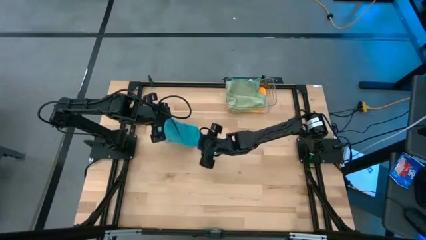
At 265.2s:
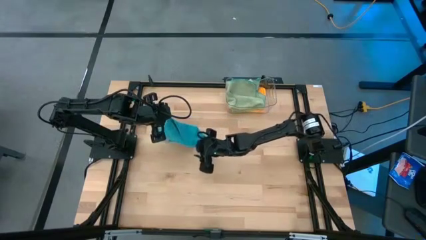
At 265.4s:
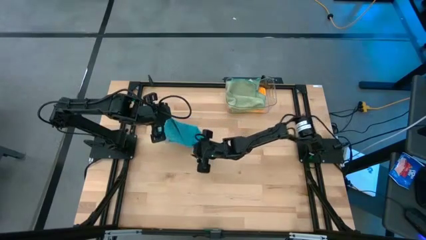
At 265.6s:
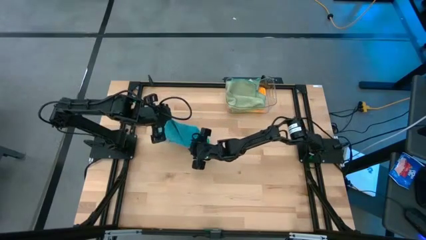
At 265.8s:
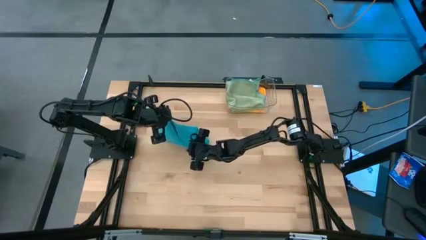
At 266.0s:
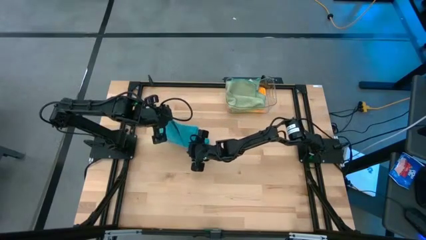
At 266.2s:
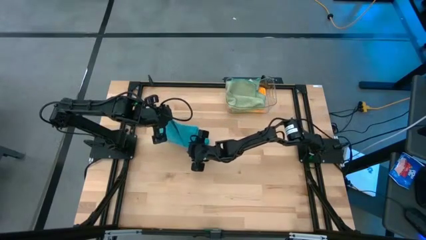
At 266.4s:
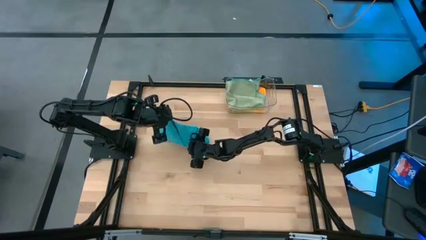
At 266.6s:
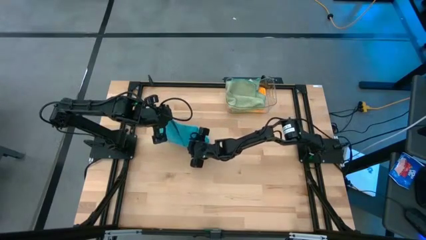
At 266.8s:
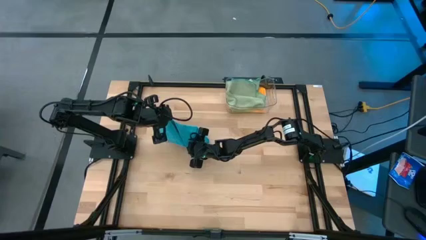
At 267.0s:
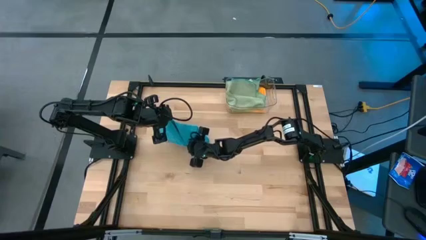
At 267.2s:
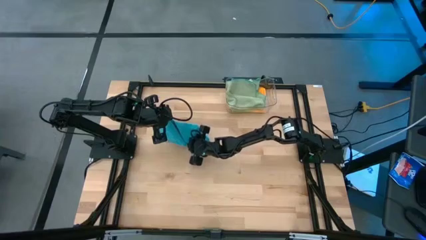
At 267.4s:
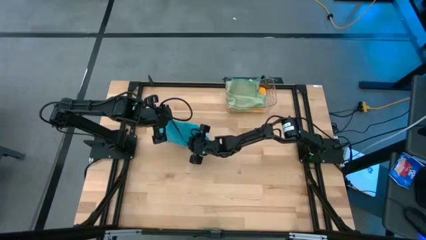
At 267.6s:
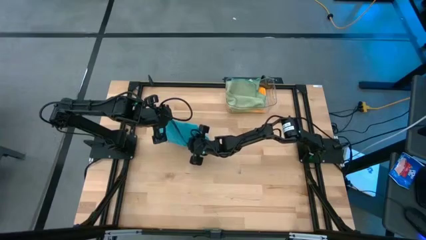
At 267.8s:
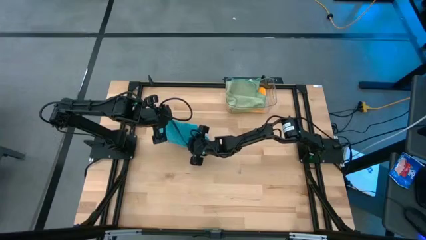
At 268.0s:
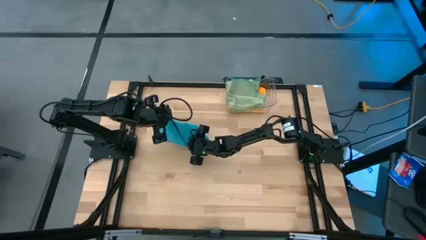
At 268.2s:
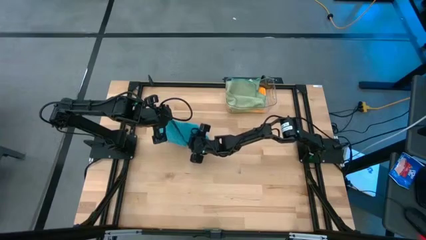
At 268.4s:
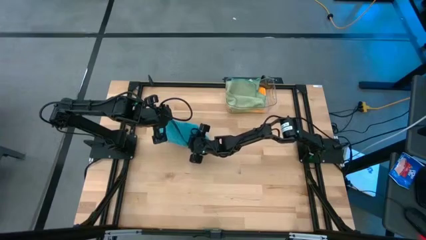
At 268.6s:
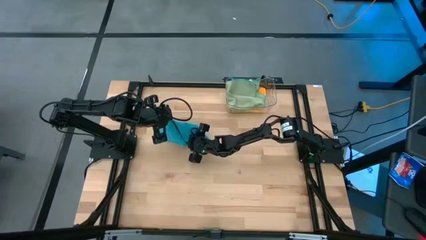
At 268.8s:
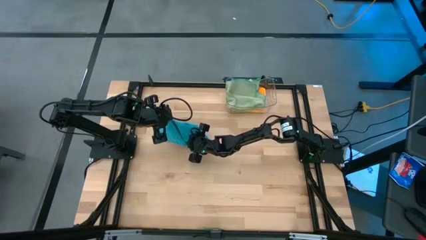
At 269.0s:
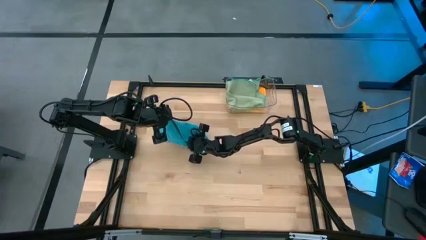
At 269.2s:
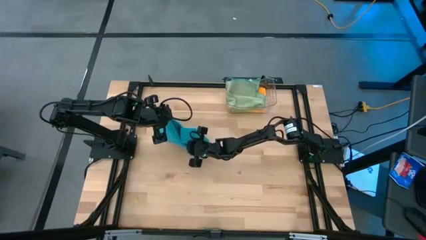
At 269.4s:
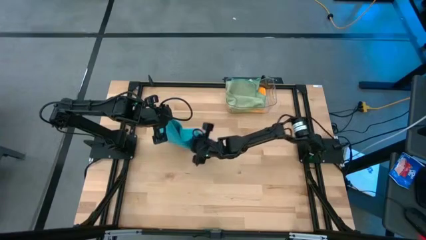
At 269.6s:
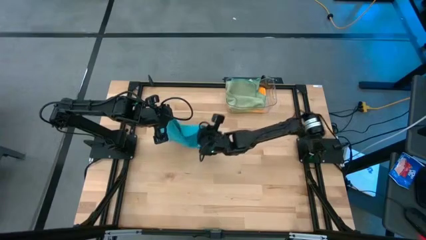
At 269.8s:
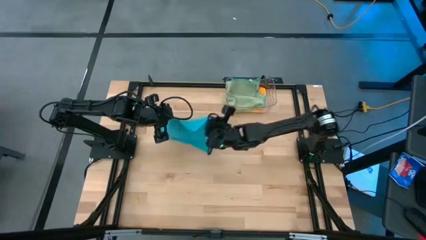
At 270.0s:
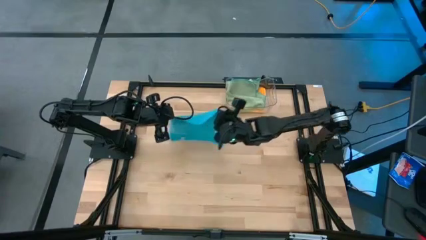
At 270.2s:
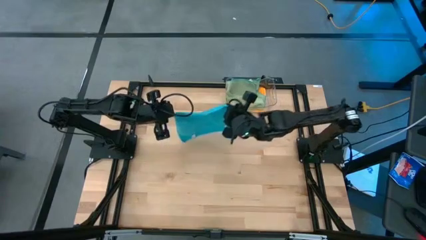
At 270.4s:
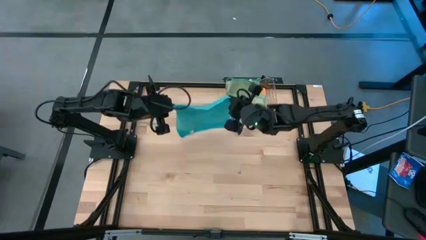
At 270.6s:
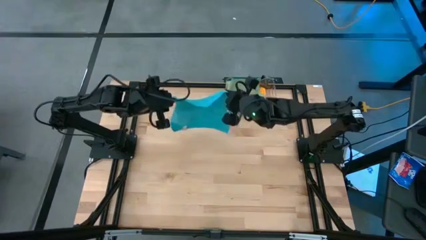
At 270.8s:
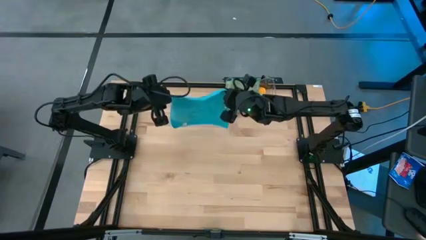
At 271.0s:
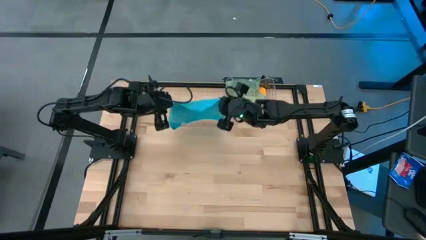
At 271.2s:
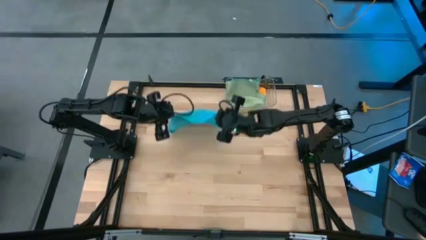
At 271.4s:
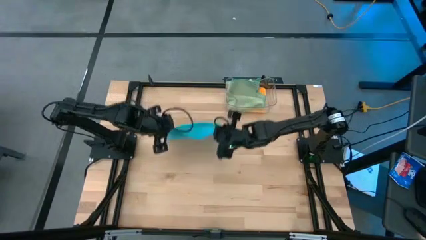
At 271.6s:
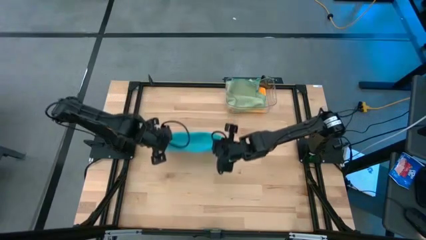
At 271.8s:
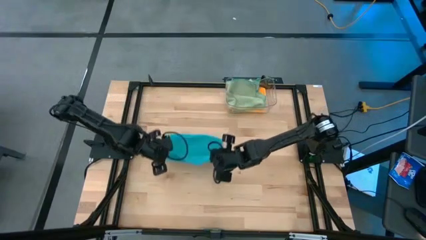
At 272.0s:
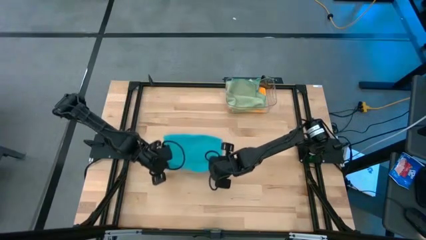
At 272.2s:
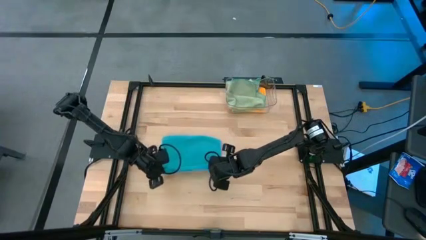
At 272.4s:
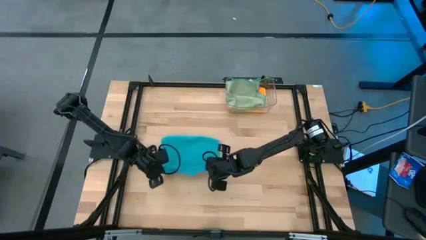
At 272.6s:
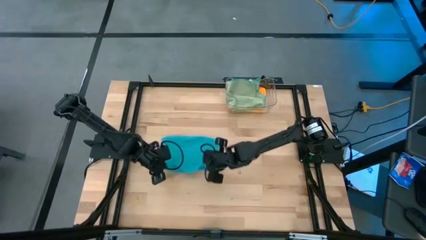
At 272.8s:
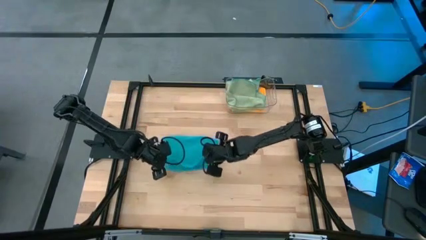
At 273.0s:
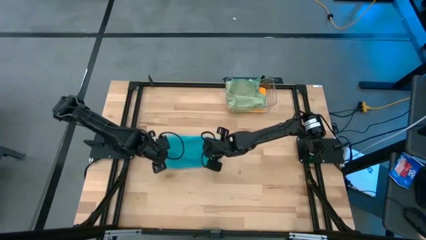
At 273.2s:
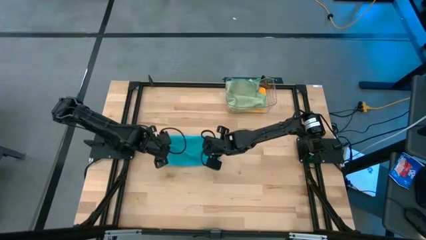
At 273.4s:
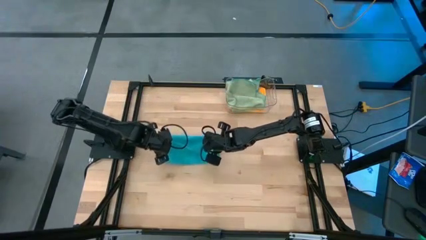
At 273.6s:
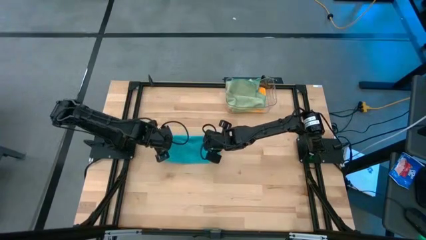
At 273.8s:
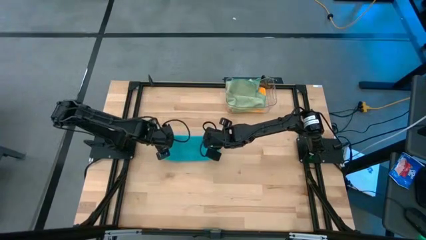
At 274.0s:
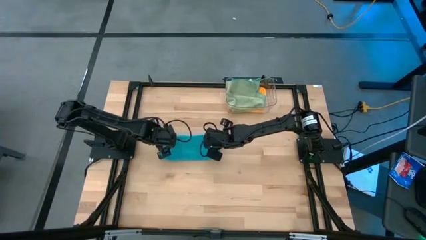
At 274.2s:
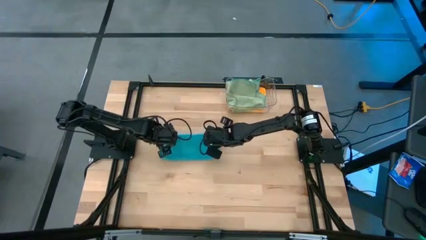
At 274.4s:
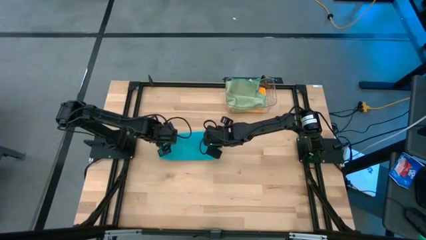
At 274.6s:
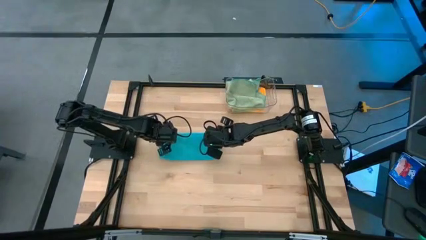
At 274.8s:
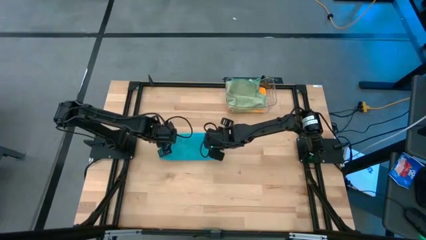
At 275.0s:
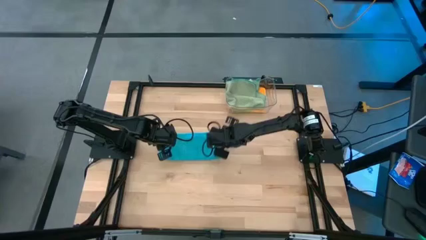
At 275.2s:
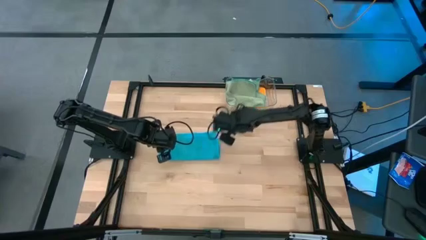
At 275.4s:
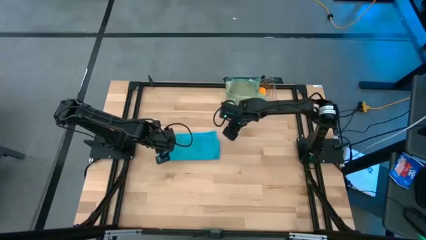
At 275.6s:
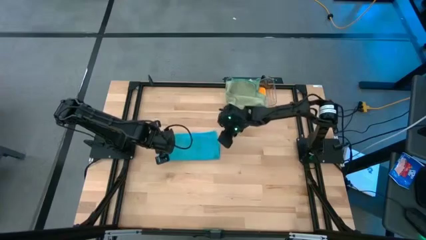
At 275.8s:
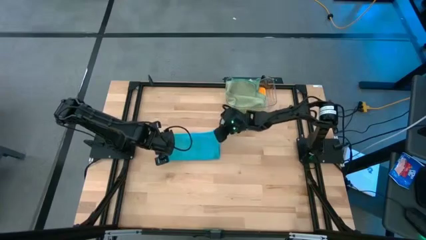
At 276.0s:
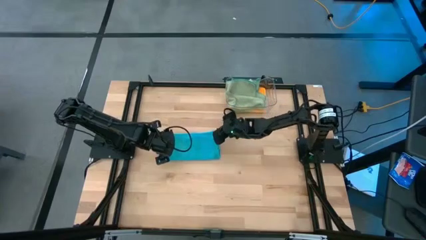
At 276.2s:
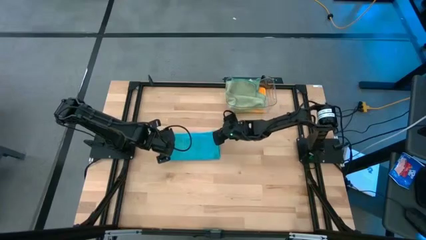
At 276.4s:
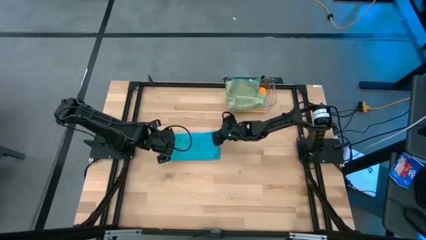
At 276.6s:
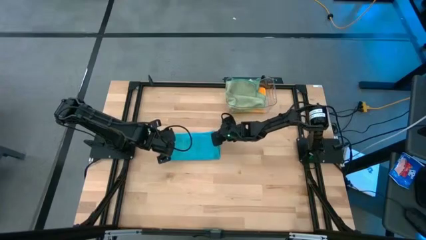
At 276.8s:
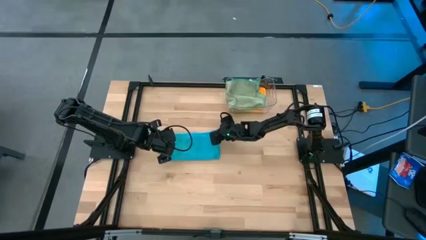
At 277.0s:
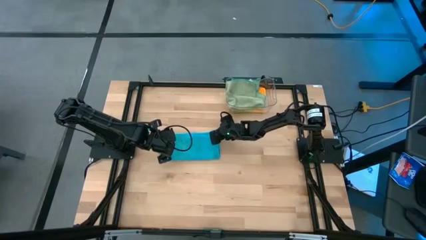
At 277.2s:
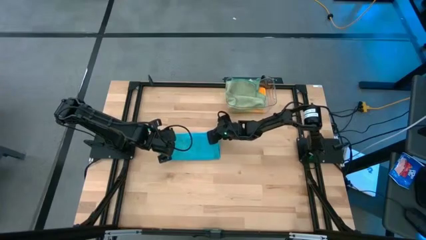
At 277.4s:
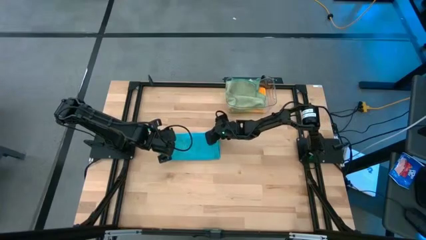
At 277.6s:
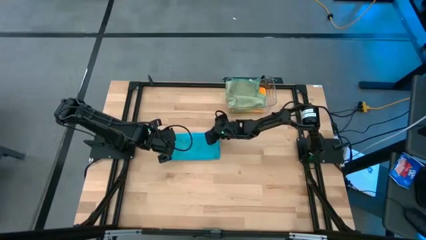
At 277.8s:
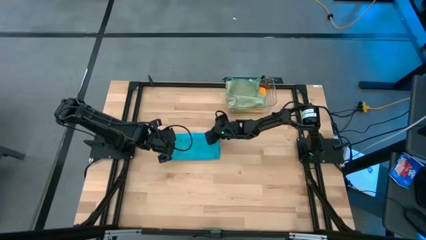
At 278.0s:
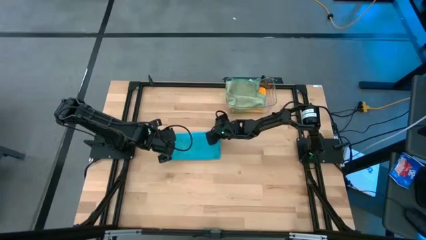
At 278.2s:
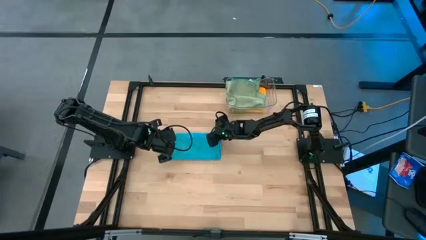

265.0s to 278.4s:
Task: Fold microfiber towels
Fold the blue microfiber towel

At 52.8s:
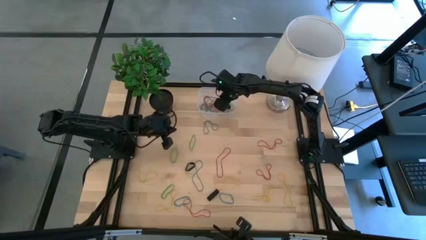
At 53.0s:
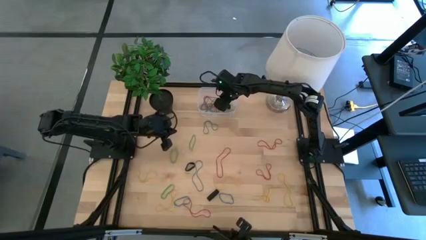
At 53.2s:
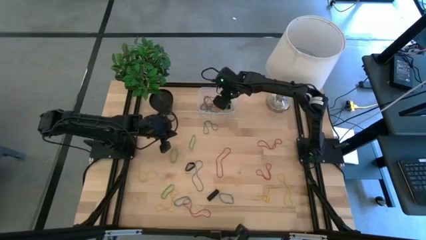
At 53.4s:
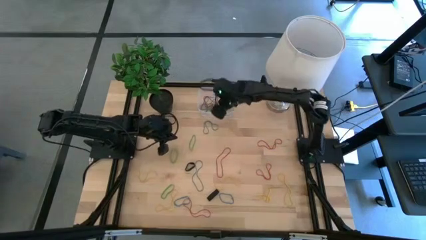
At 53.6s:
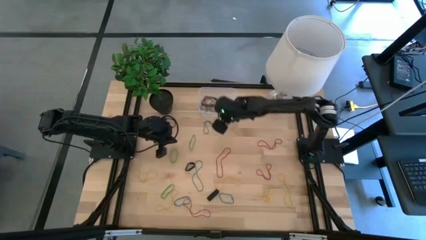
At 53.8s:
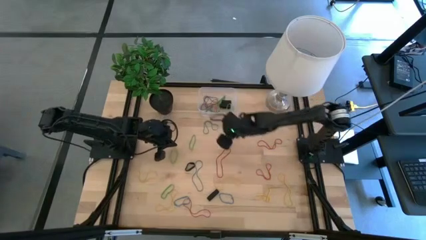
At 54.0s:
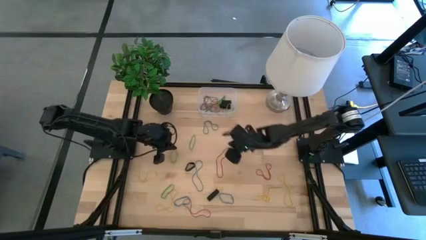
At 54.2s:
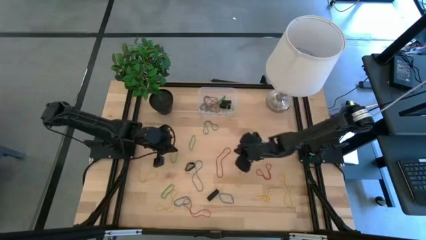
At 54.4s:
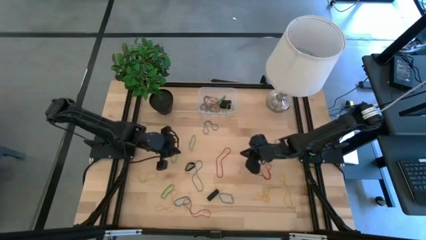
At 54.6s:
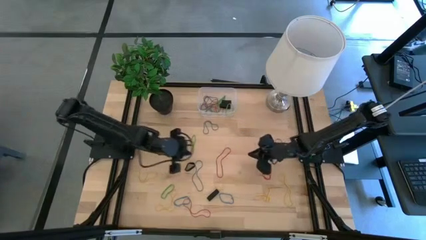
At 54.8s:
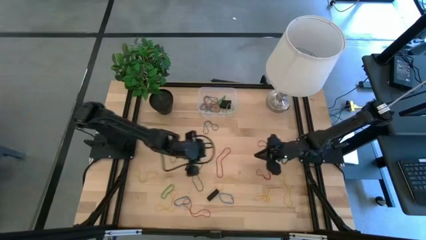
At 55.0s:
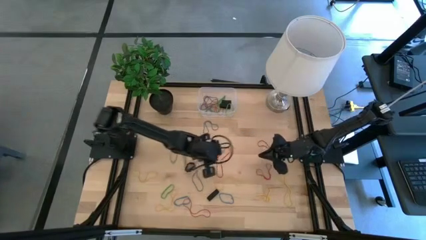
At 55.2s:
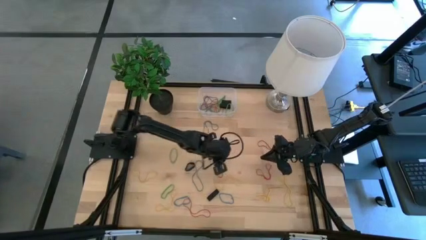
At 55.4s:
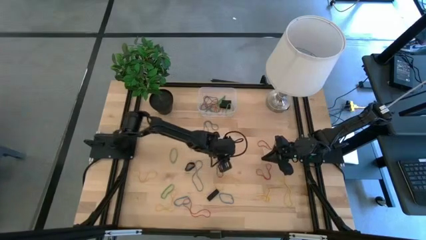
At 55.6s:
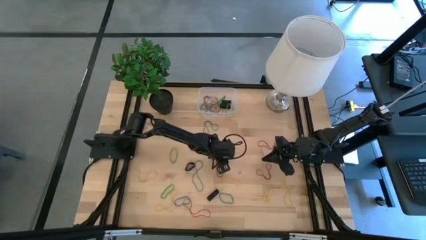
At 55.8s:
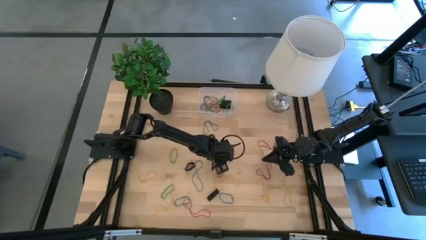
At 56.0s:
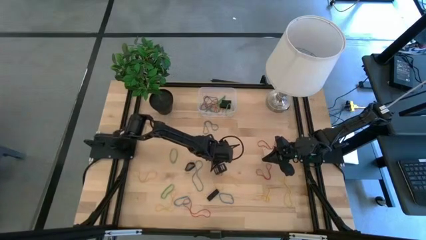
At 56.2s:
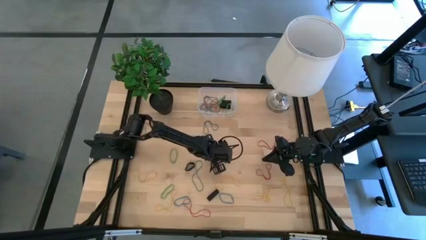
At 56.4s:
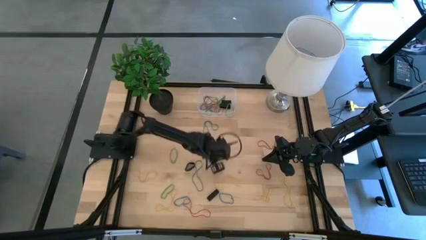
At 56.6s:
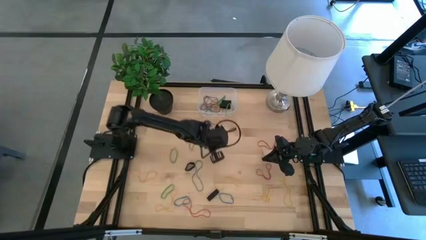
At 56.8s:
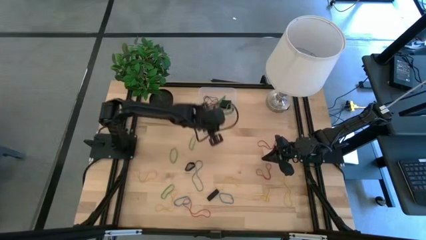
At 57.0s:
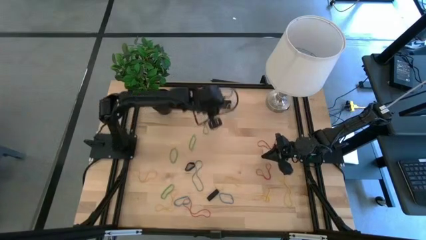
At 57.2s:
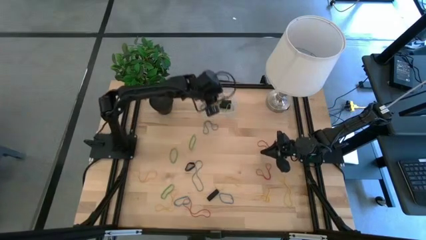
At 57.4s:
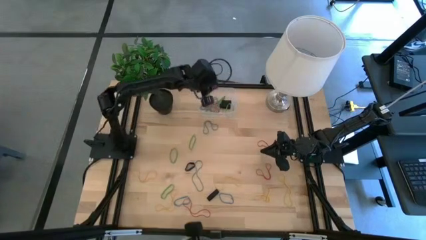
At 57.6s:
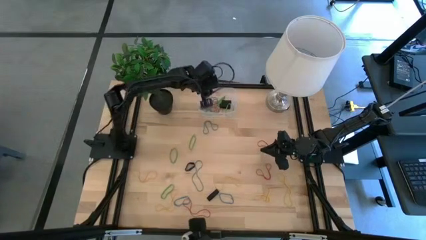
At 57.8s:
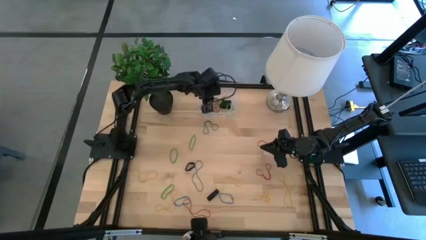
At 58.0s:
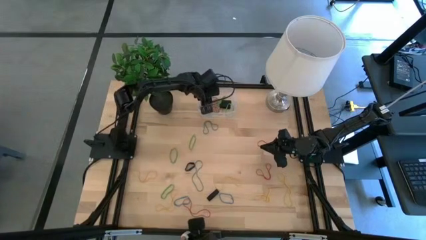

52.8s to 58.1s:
Task: Pick and place rubber bands into bin
Put the red rubber band into the transparent bin
